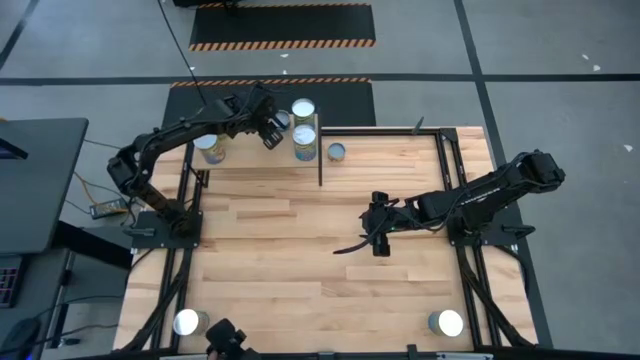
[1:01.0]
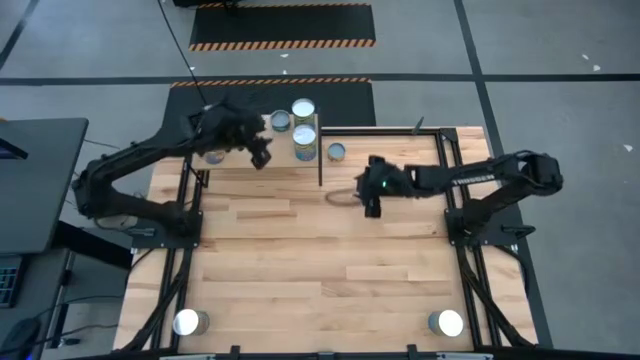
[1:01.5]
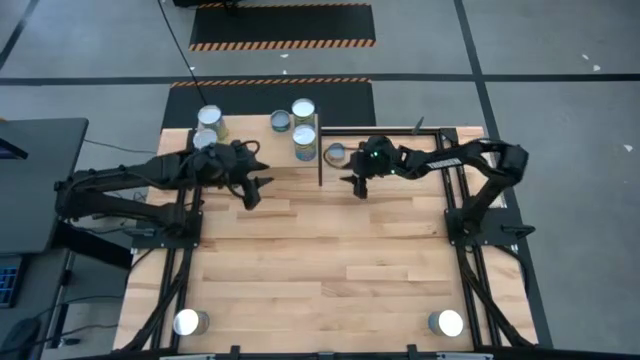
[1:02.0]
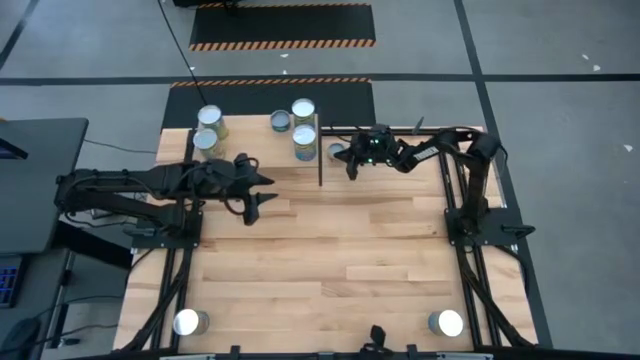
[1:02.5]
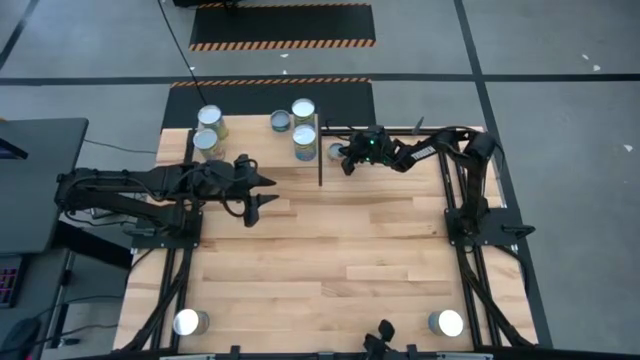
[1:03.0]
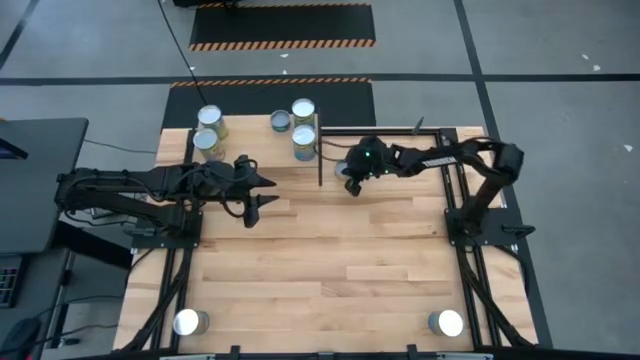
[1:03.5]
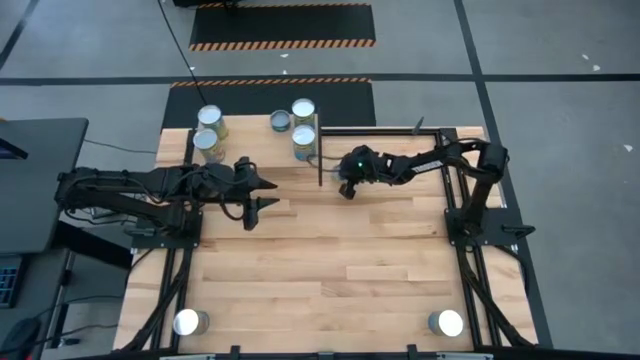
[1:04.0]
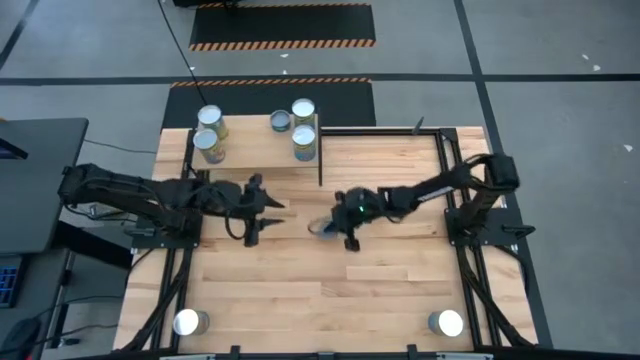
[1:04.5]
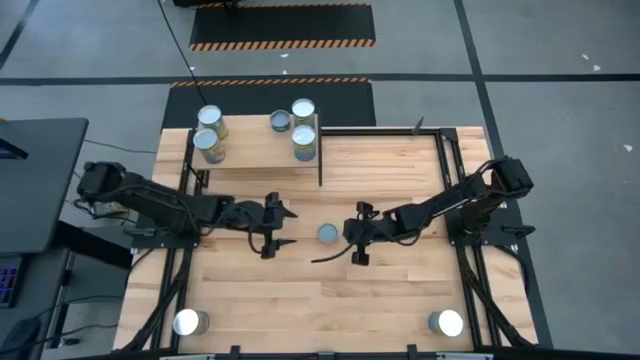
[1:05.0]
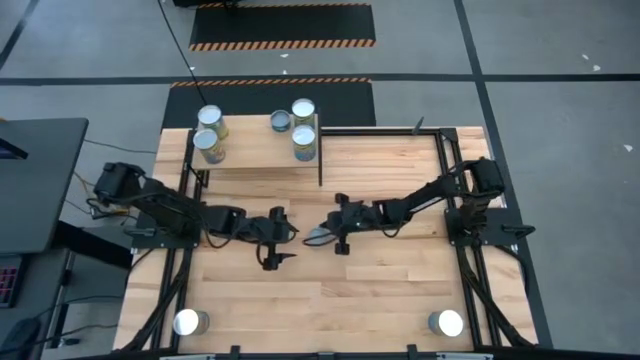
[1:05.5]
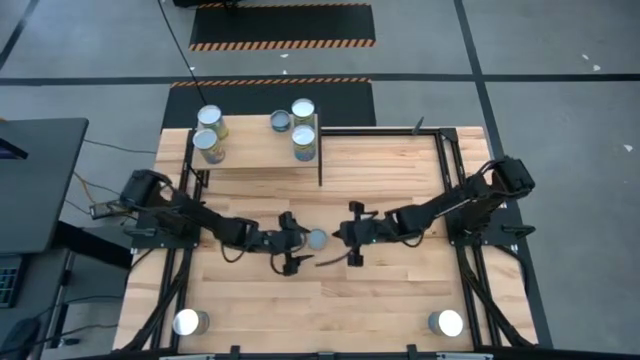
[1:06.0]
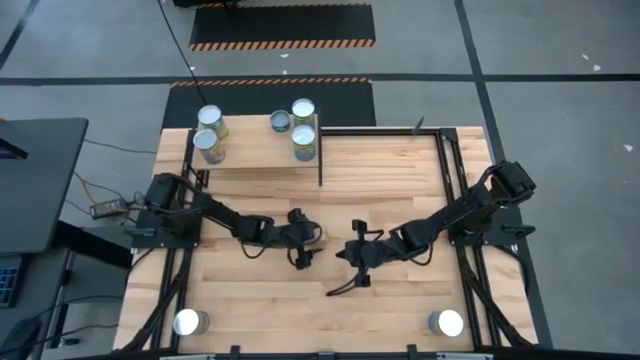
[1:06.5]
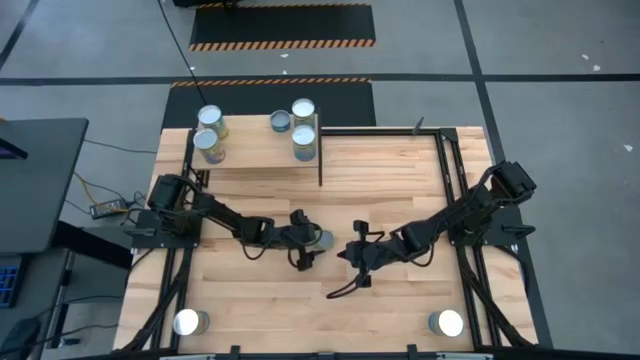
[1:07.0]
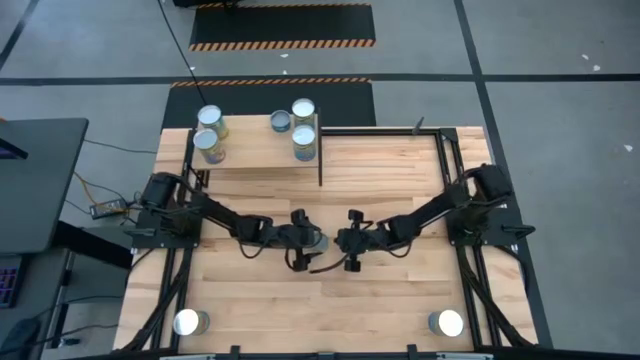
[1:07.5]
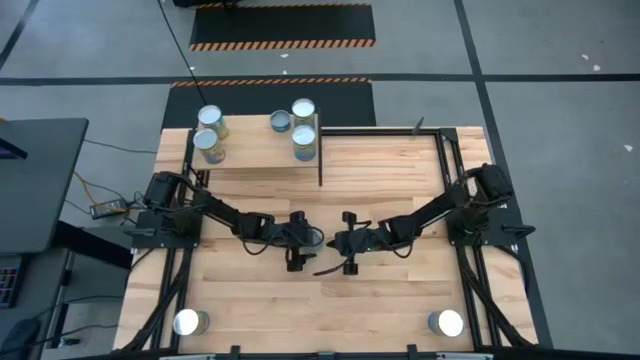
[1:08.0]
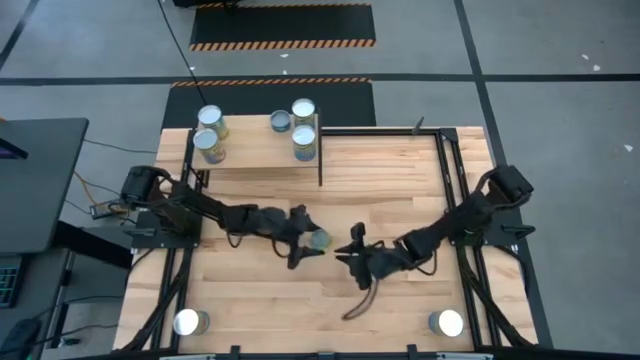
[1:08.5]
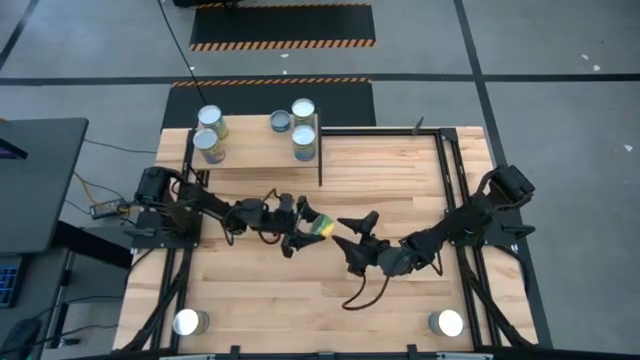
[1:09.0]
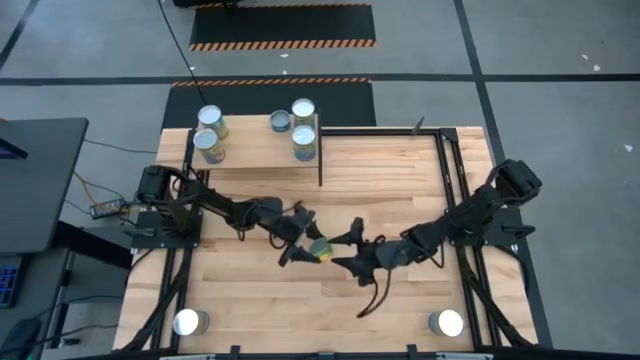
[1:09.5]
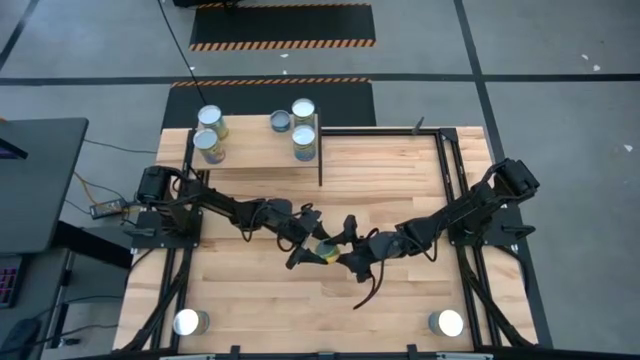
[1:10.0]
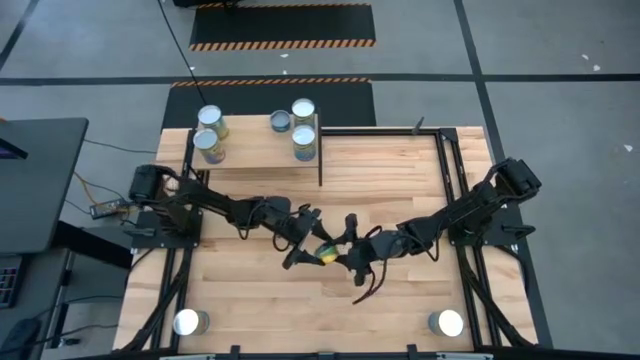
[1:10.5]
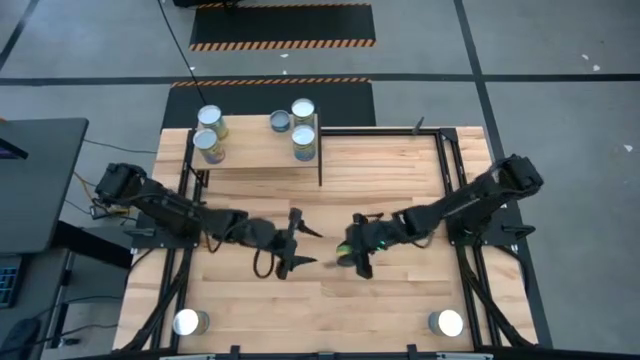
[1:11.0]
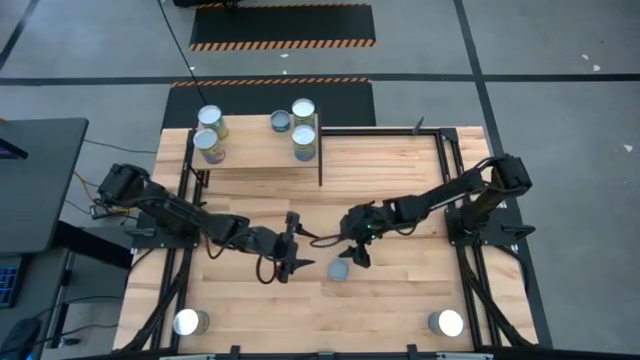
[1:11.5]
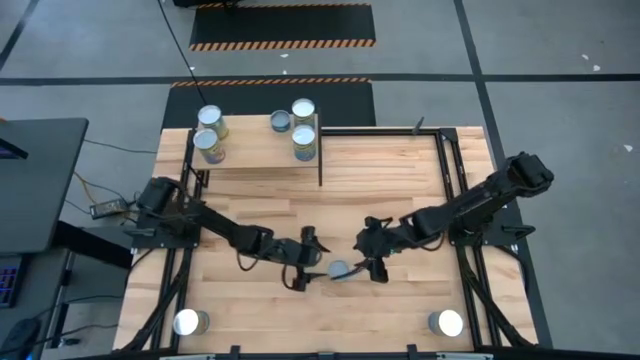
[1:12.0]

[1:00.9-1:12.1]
Task: Pick and place cans onto a shelf
Put the mushroom can on the shelf

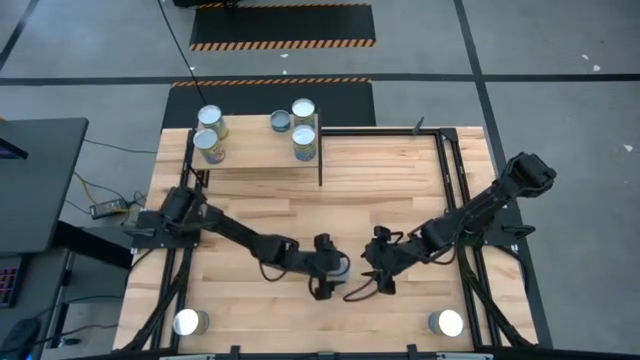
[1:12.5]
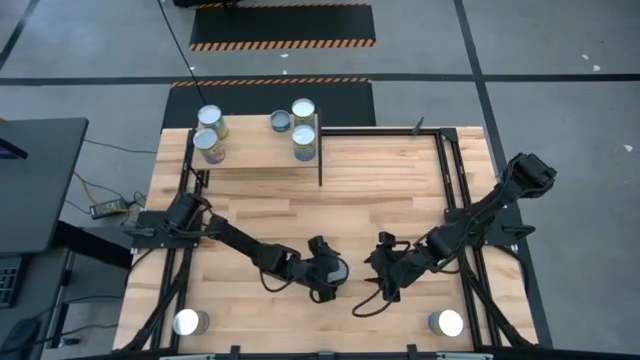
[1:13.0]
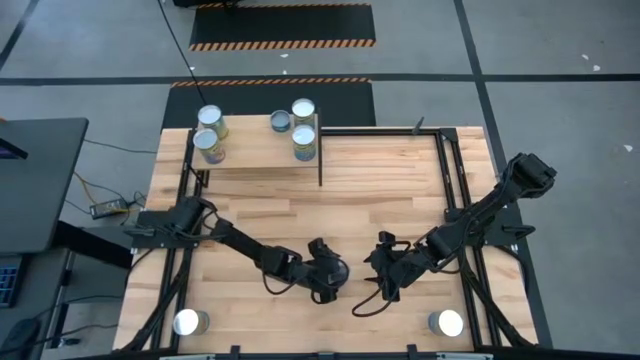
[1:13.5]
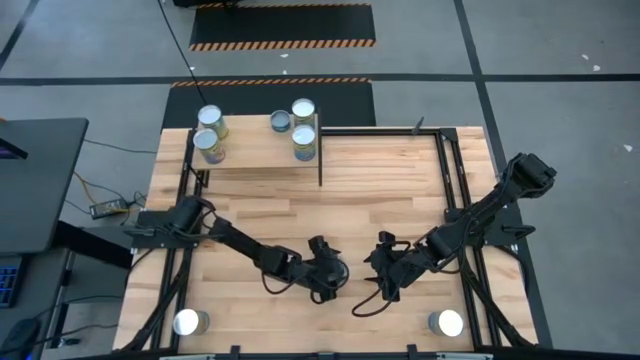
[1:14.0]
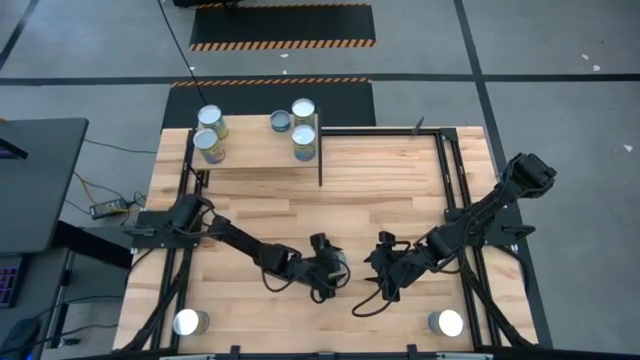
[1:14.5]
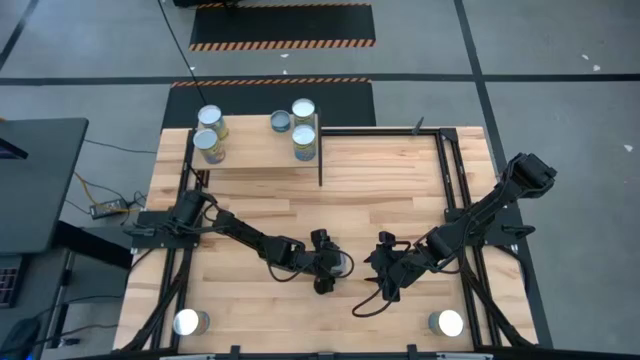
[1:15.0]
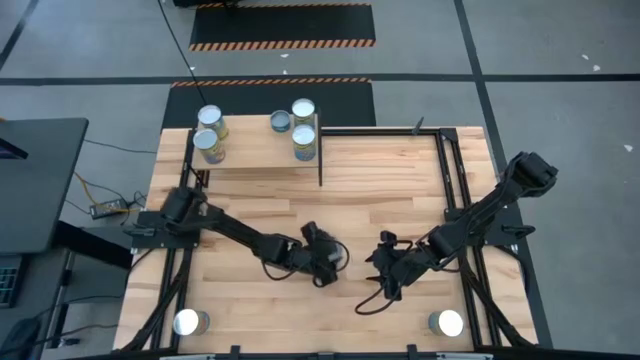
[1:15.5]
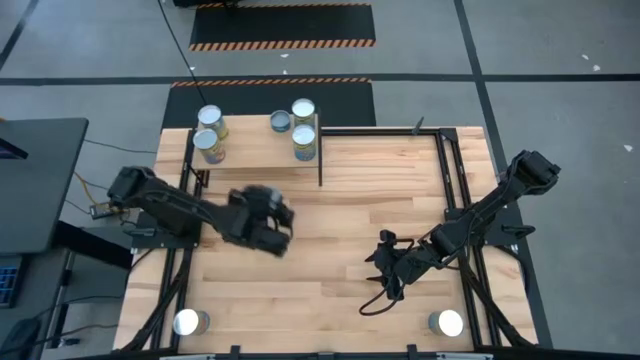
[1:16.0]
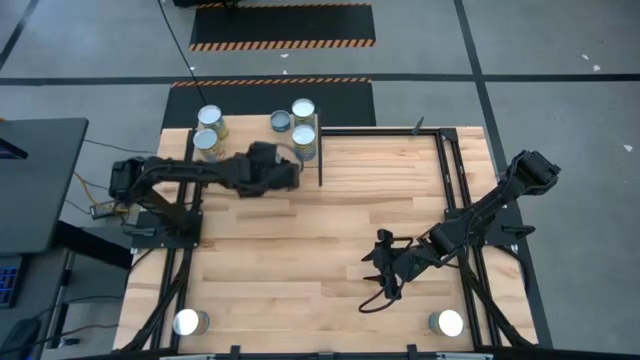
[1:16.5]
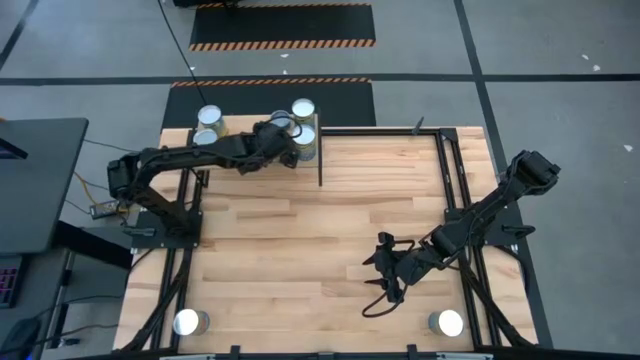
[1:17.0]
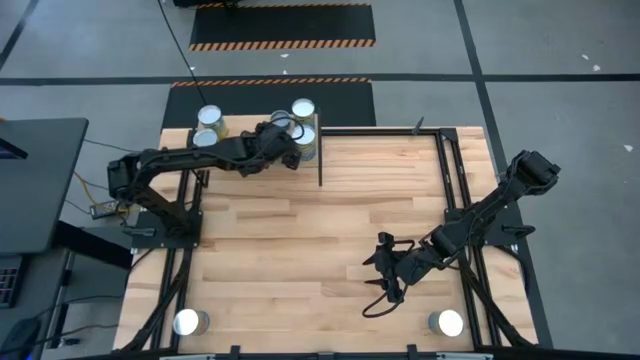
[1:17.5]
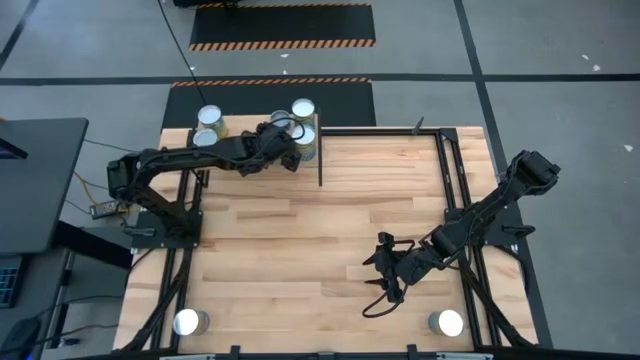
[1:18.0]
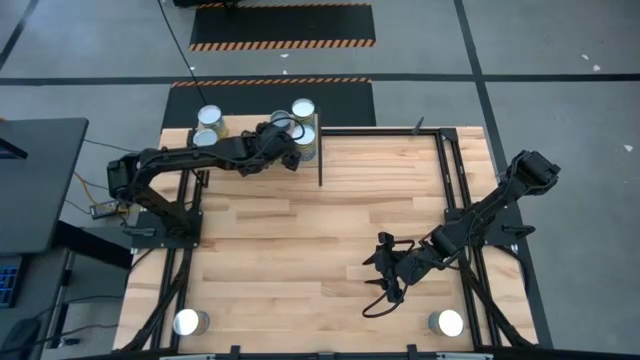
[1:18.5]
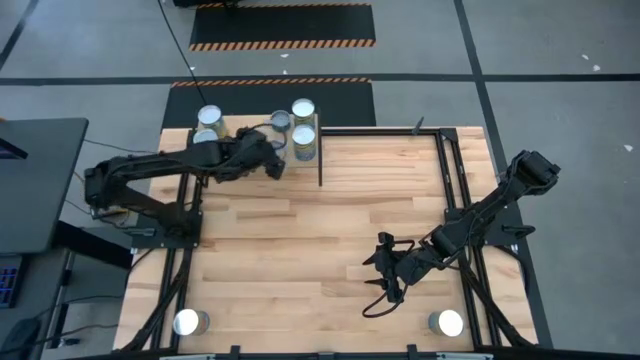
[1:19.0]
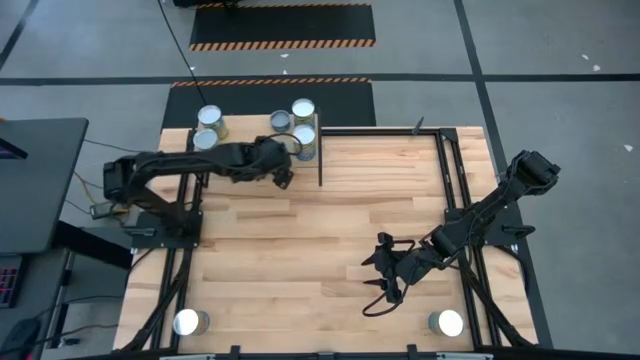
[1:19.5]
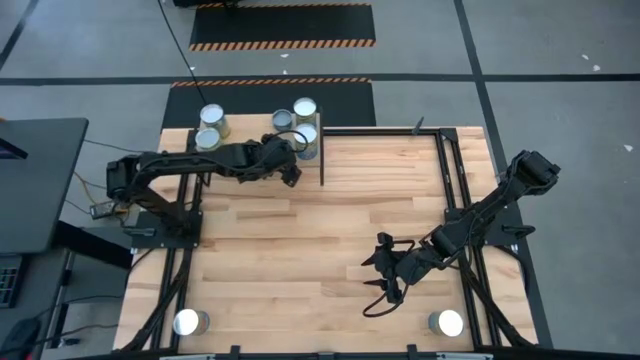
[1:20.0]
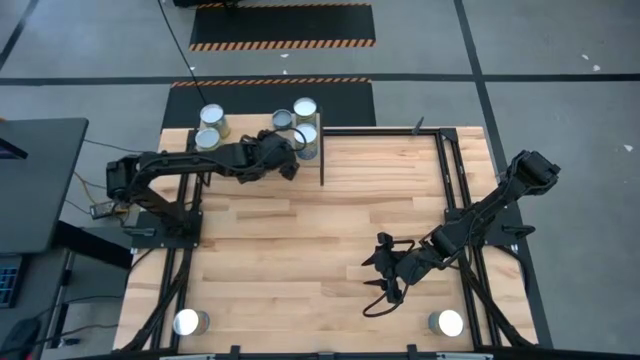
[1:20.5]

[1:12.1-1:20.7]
Put the mushroom can on the shelf
